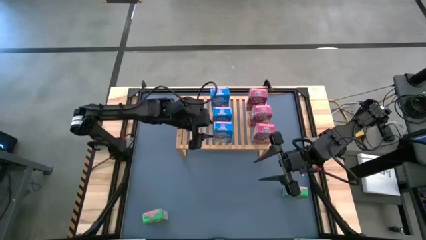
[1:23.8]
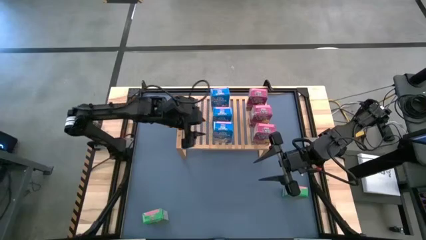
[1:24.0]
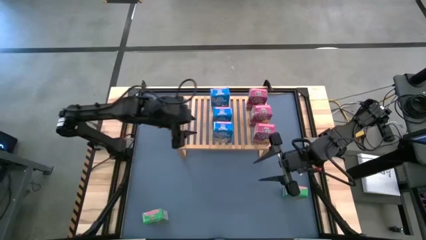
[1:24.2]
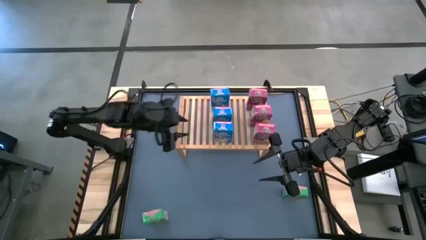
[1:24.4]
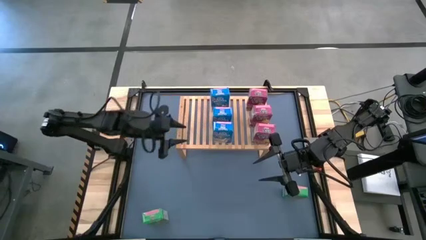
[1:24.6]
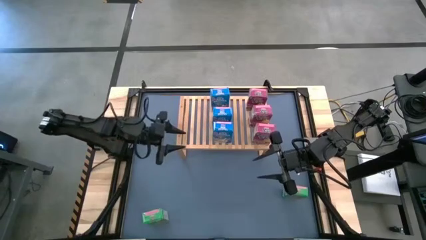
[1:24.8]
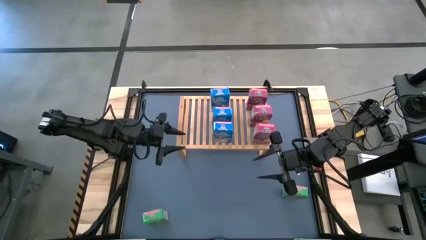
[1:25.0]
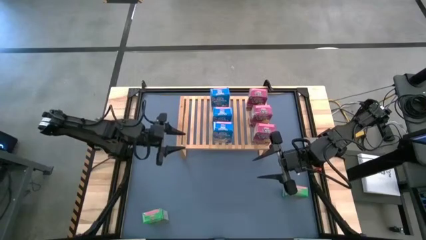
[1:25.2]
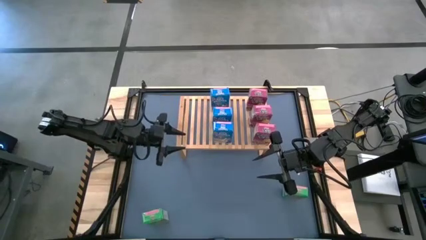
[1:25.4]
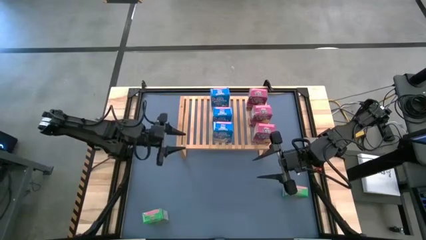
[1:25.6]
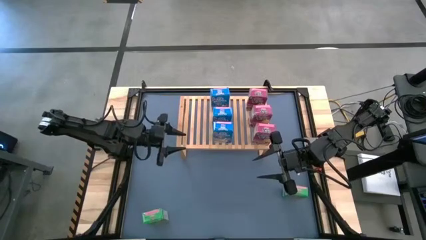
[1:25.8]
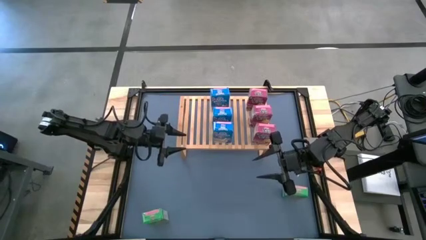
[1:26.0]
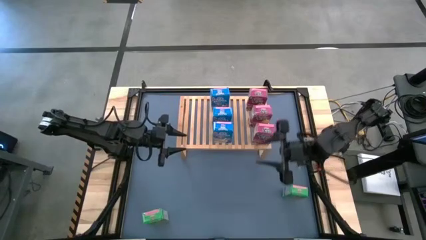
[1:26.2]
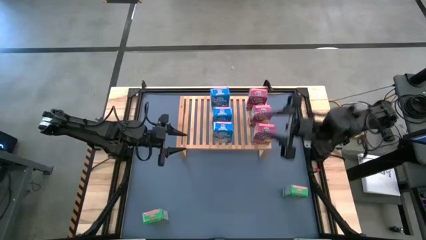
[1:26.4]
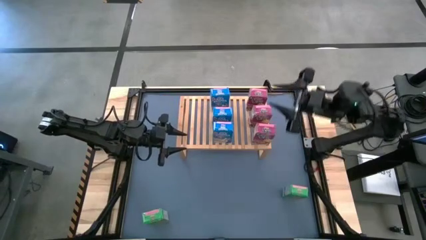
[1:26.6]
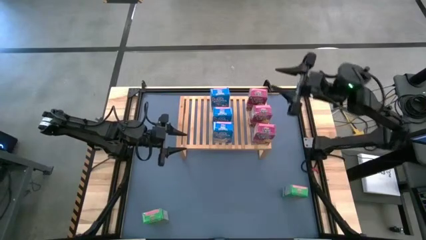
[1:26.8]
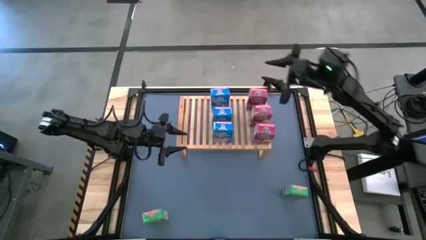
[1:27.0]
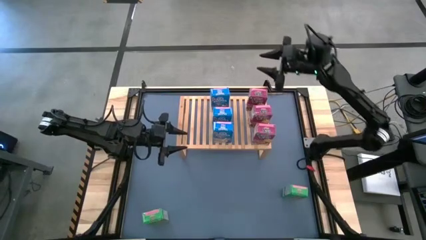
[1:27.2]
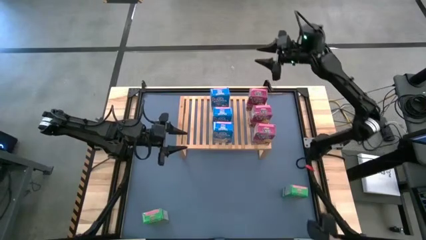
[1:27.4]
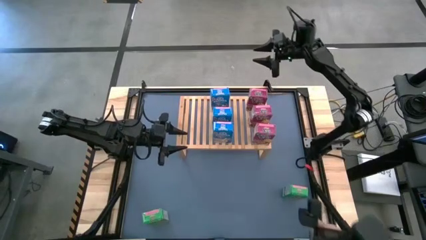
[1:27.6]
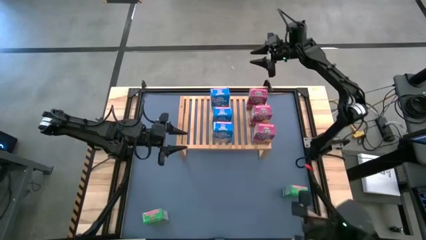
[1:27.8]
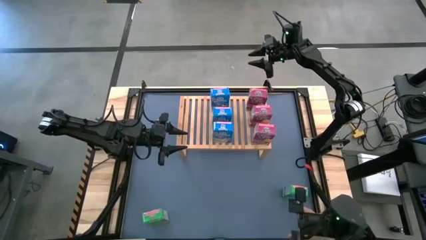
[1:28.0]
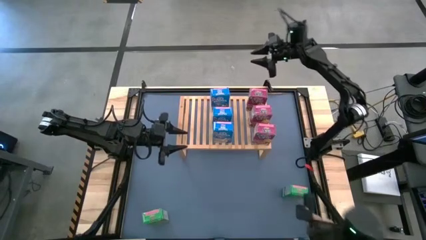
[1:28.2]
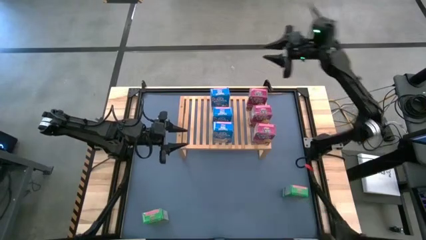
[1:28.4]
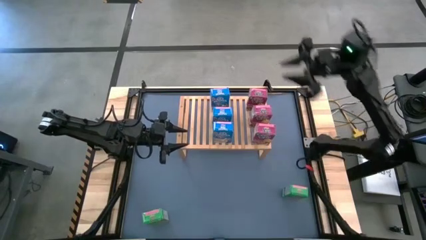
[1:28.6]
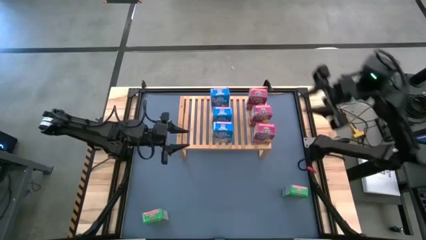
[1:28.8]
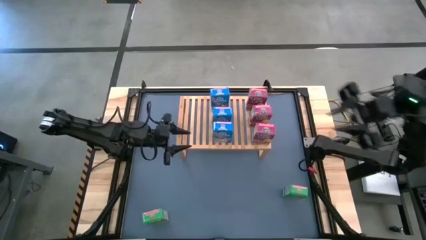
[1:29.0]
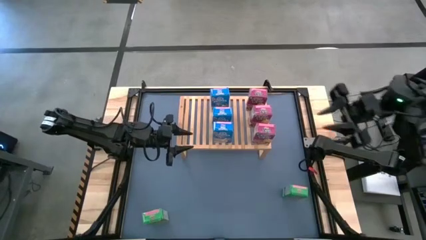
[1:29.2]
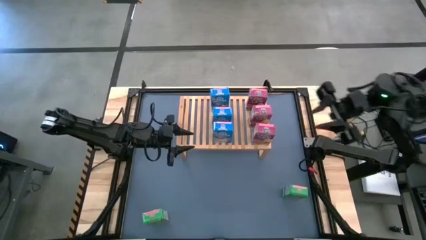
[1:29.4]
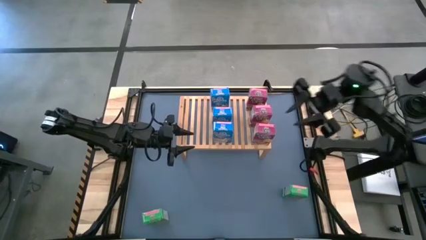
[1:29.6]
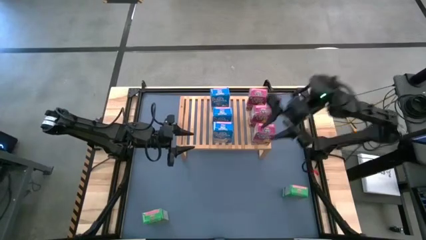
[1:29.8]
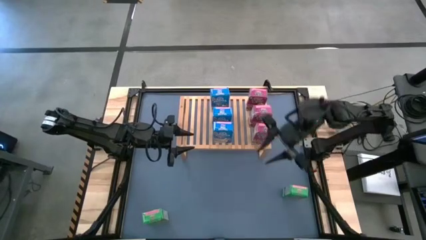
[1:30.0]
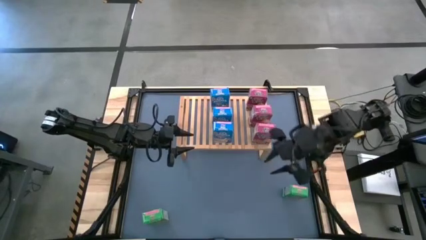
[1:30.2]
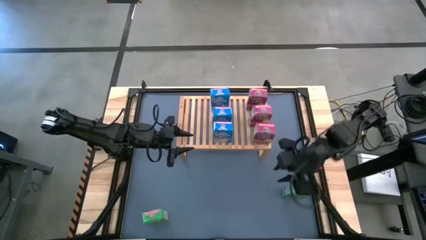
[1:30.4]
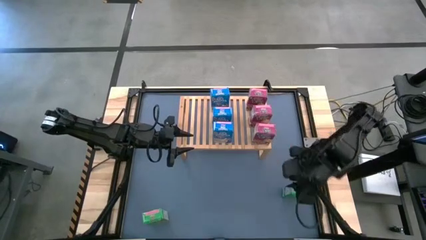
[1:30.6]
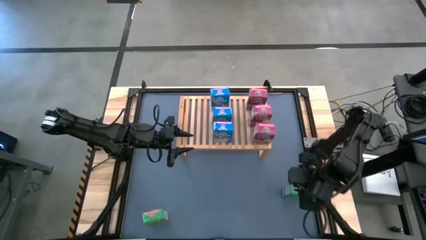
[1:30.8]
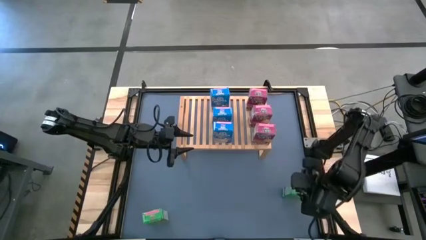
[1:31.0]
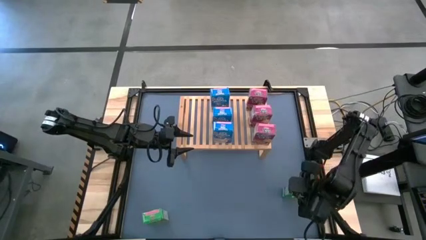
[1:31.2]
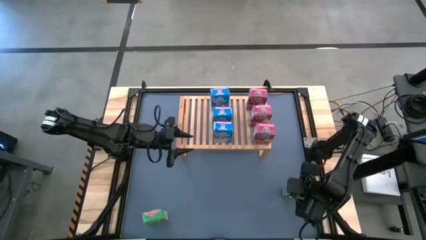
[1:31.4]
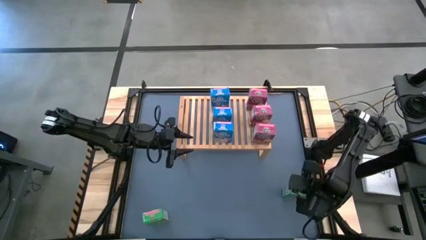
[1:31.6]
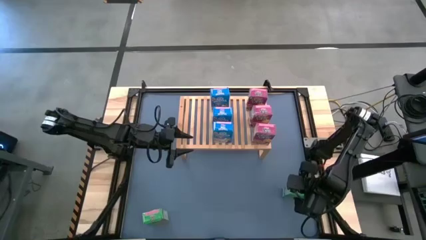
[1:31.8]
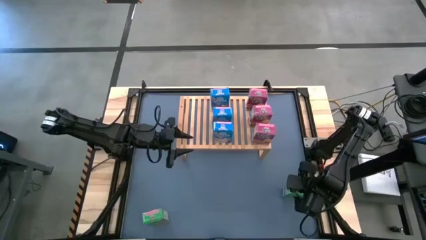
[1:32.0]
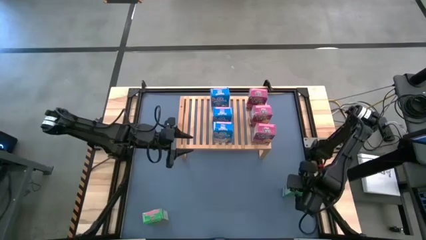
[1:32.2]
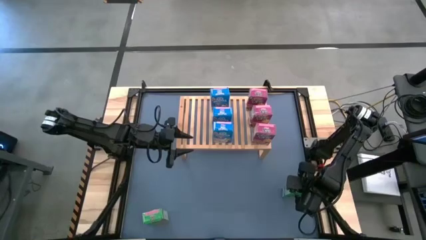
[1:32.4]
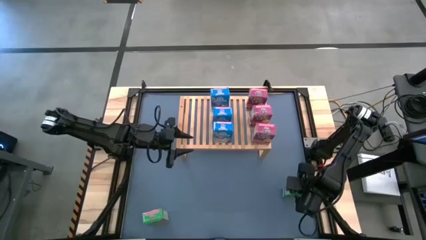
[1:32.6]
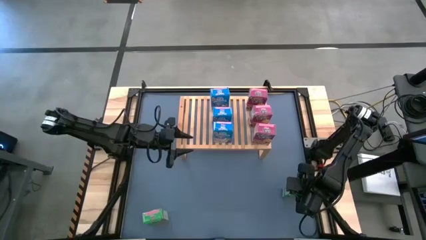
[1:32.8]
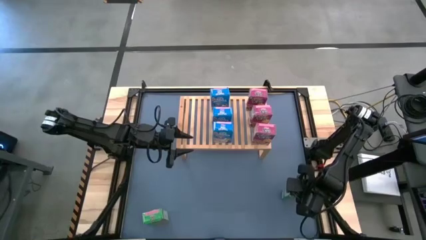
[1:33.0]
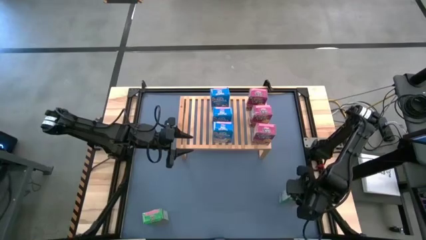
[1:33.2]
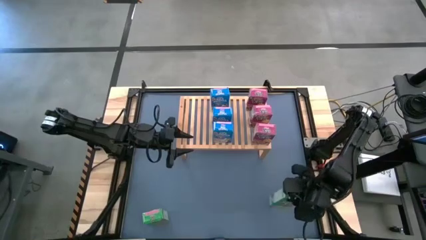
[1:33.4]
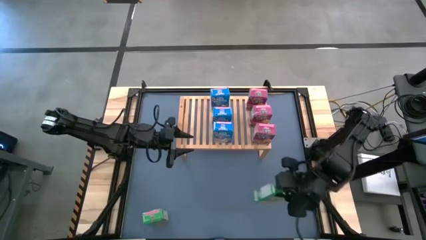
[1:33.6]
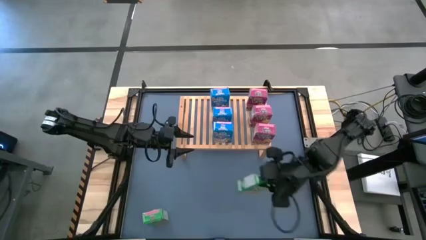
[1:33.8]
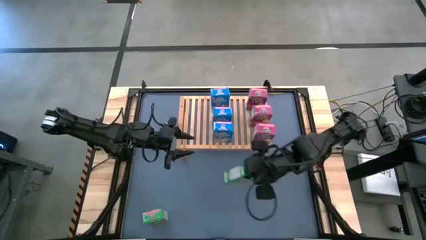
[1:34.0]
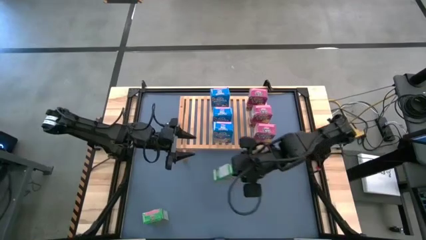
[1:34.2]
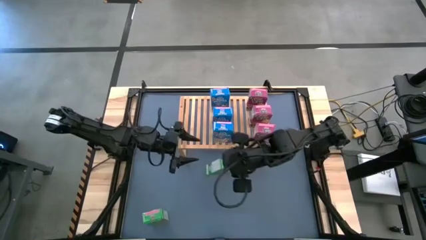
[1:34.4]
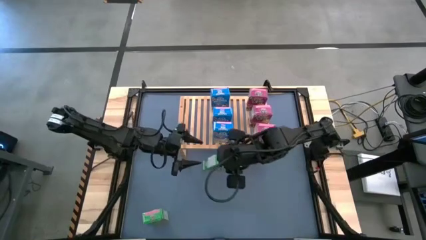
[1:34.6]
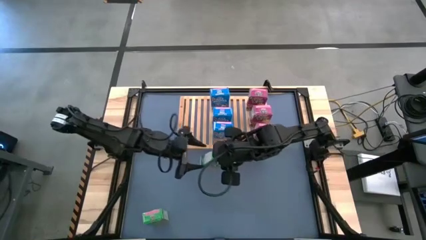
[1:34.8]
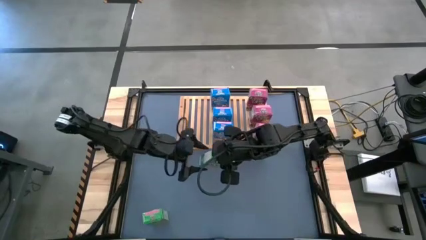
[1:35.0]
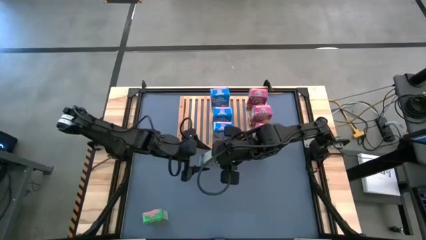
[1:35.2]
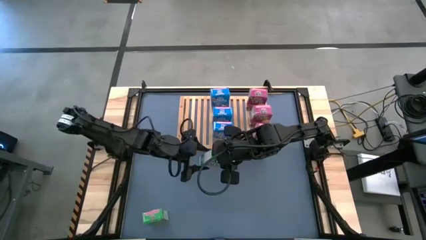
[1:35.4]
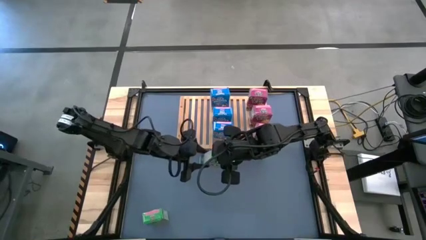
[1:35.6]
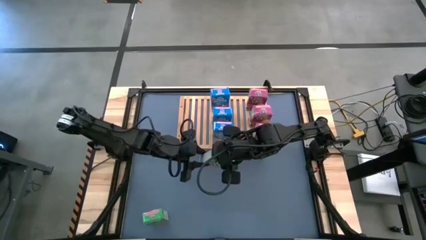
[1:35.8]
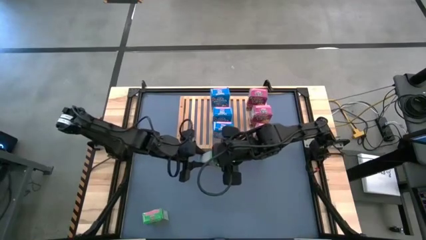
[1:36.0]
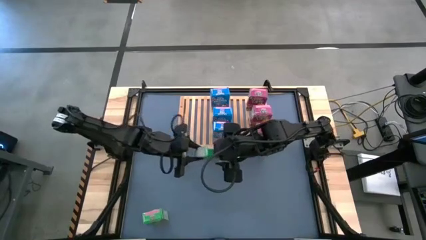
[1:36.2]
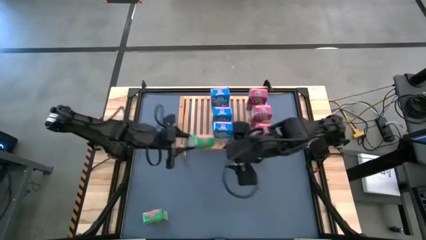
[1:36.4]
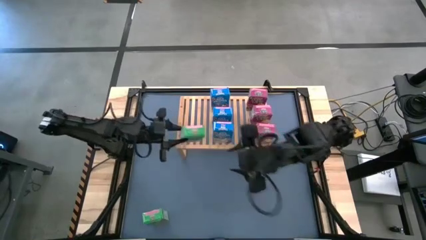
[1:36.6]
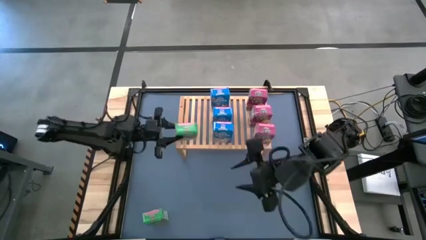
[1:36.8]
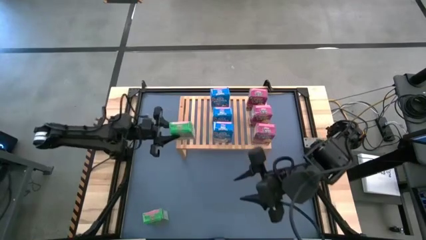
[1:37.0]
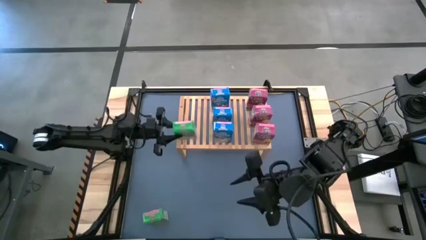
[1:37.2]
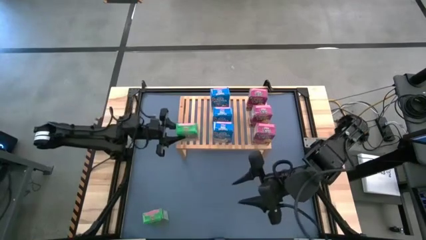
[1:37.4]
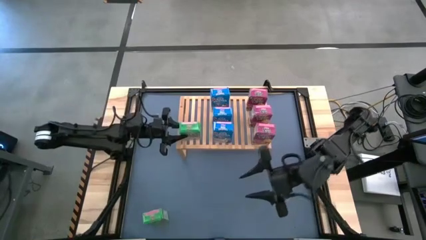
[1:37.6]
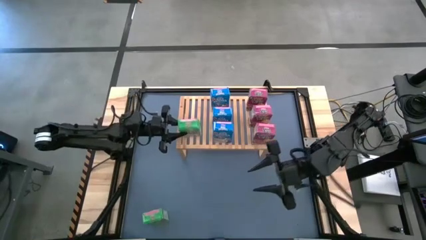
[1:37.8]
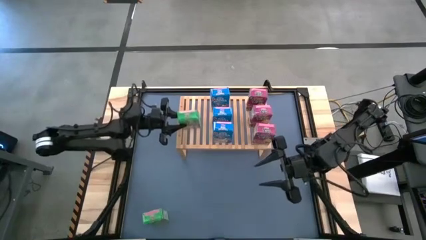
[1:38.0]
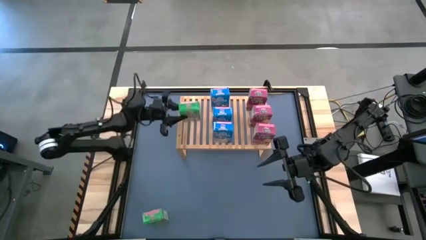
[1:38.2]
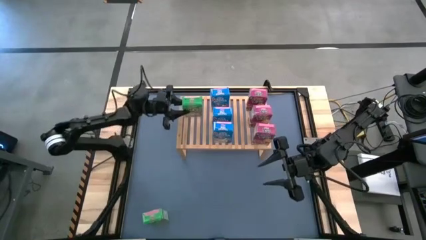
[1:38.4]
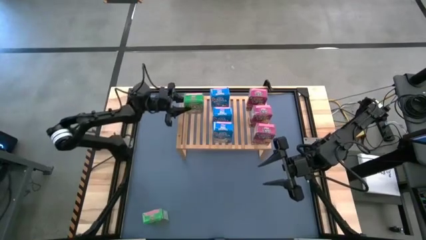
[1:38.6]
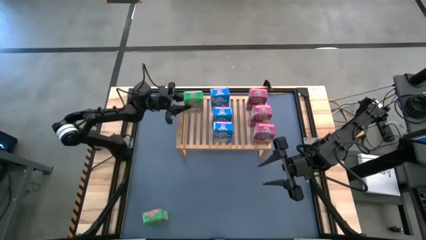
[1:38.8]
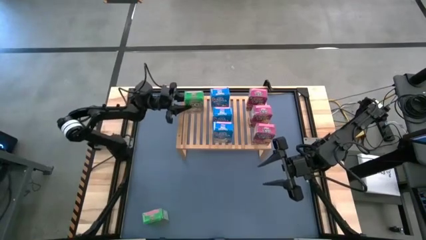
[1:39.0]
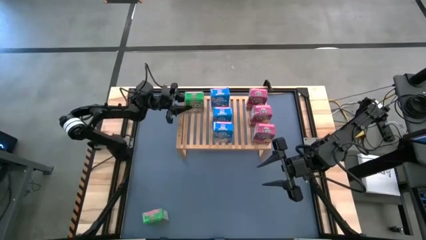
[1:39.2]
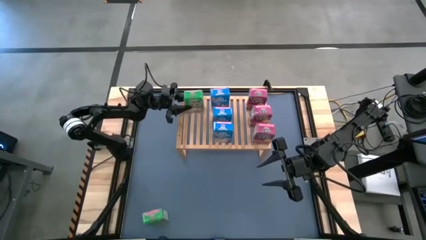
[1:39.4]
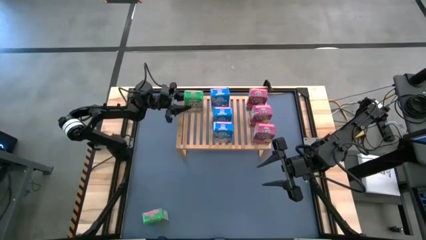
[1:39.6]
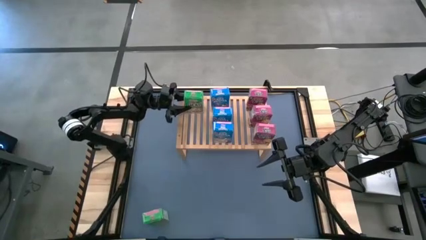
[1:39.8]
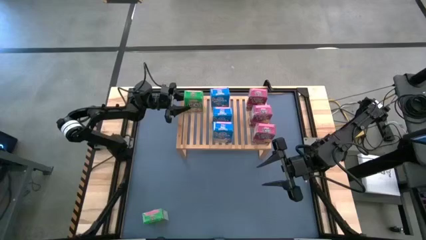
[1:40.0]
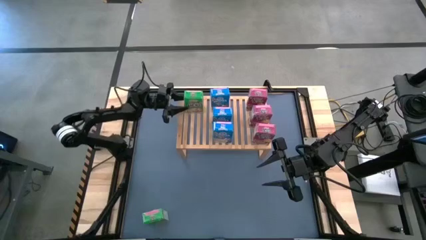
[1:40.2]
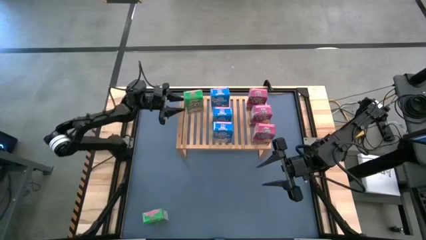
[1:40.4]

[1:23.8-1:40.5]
Task: Stack cereal on shelf
Put the bottom right green cereal box on the shelf
